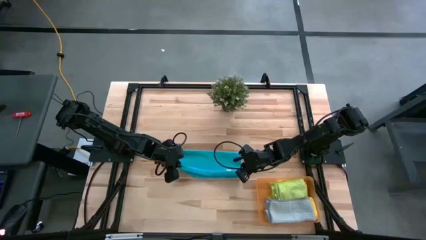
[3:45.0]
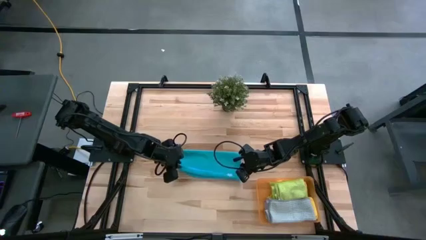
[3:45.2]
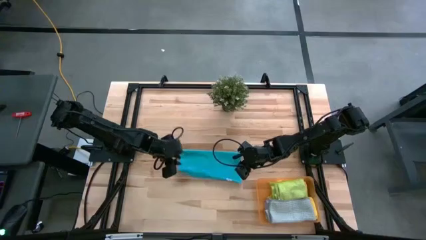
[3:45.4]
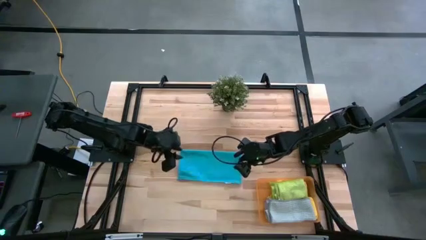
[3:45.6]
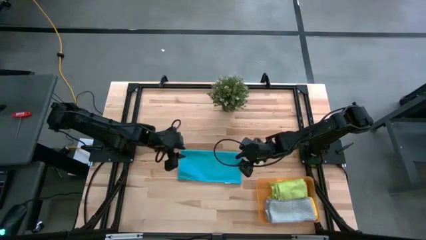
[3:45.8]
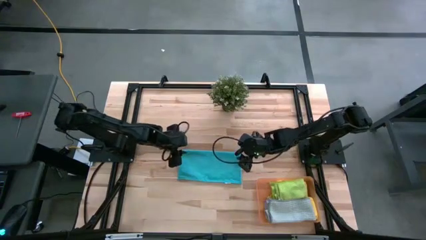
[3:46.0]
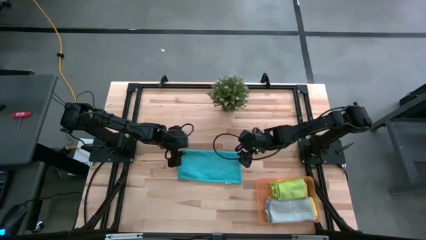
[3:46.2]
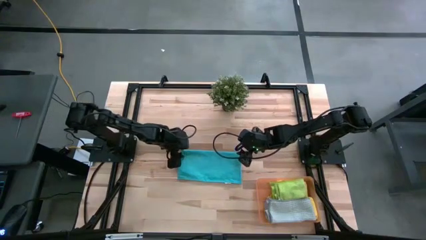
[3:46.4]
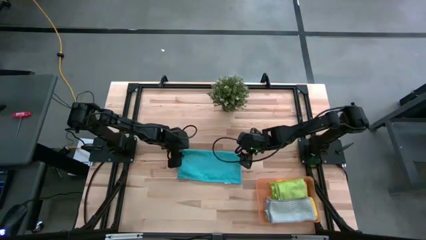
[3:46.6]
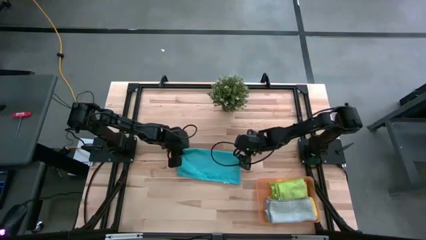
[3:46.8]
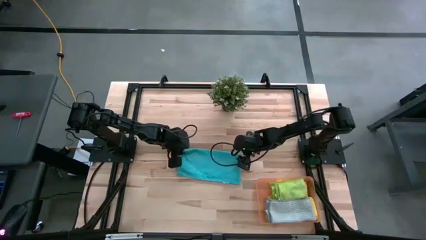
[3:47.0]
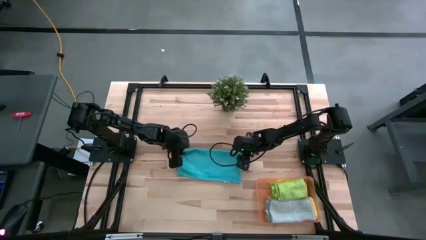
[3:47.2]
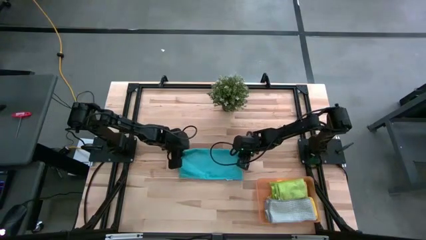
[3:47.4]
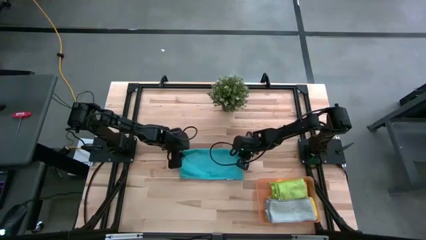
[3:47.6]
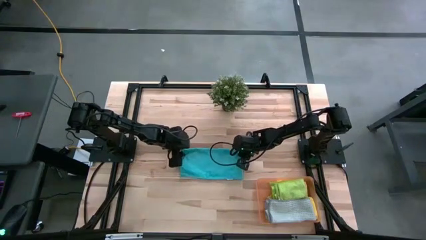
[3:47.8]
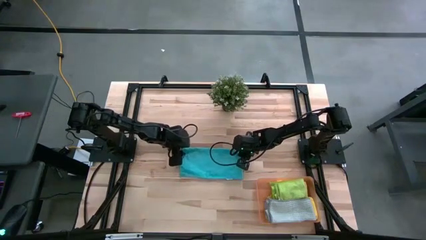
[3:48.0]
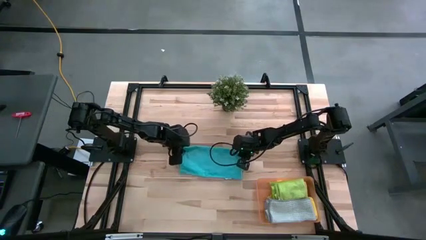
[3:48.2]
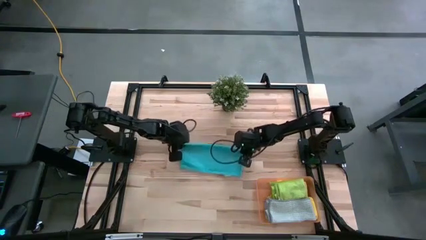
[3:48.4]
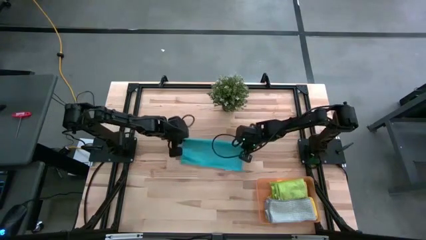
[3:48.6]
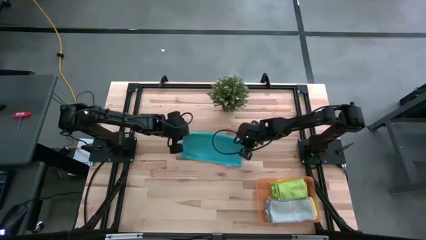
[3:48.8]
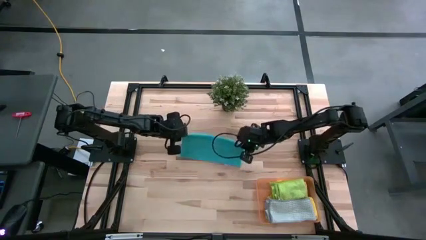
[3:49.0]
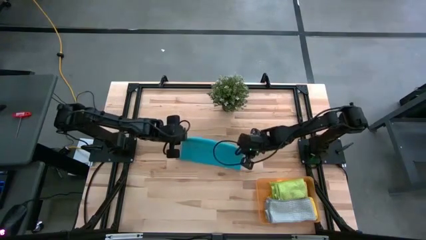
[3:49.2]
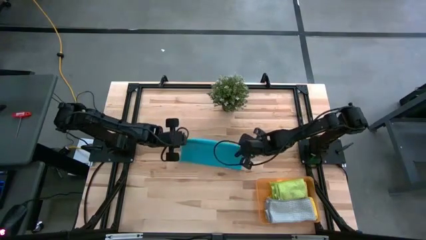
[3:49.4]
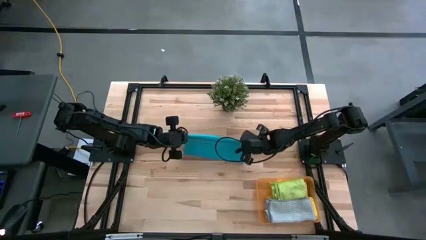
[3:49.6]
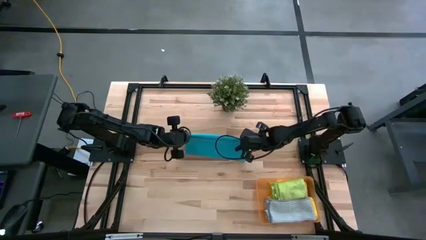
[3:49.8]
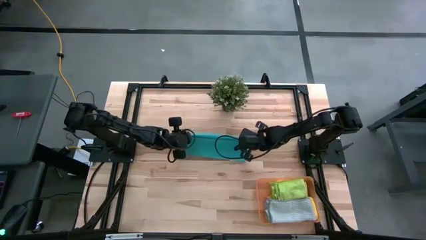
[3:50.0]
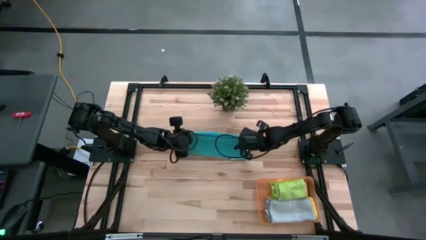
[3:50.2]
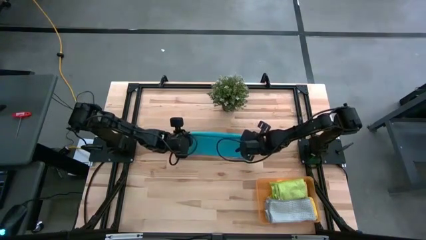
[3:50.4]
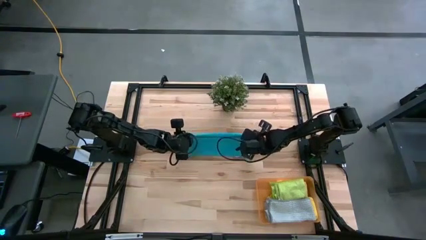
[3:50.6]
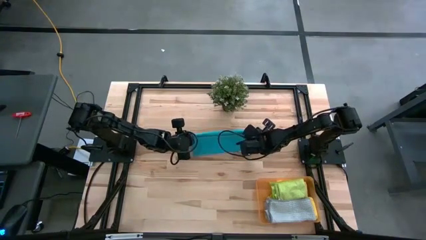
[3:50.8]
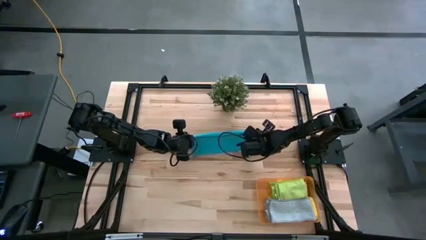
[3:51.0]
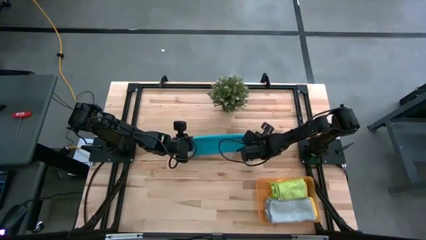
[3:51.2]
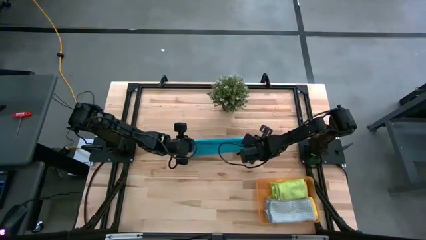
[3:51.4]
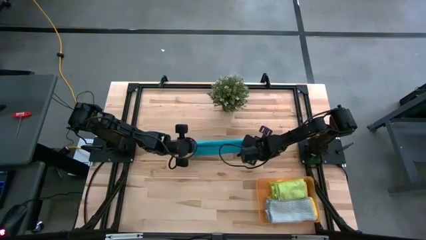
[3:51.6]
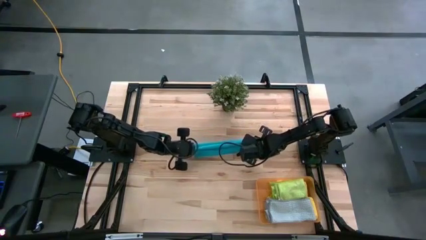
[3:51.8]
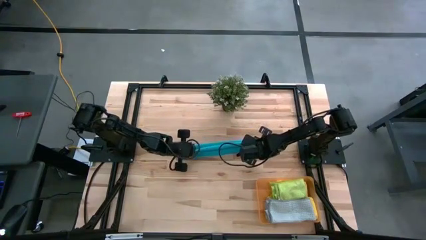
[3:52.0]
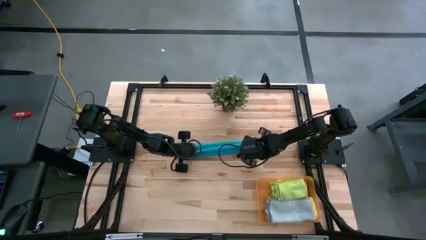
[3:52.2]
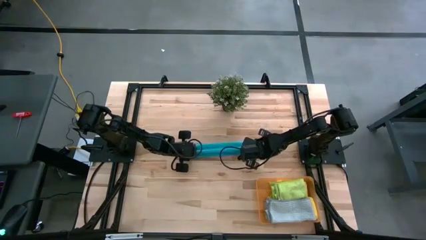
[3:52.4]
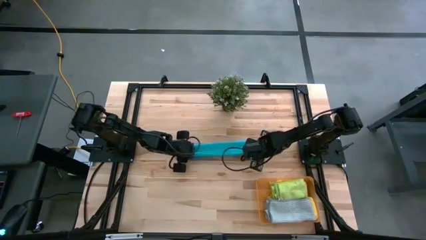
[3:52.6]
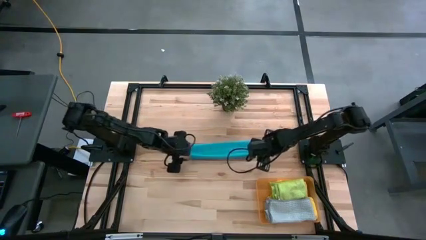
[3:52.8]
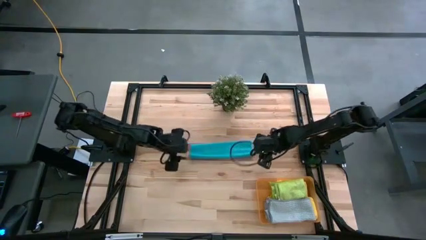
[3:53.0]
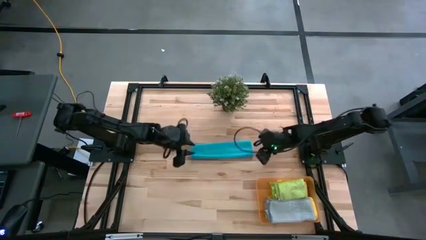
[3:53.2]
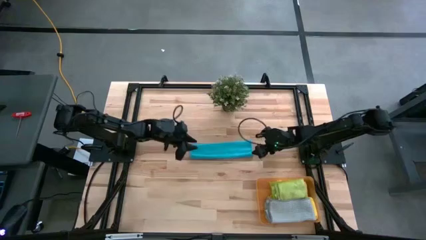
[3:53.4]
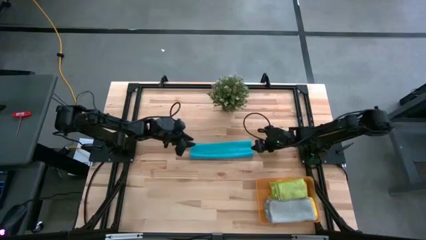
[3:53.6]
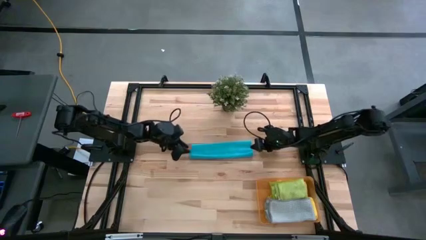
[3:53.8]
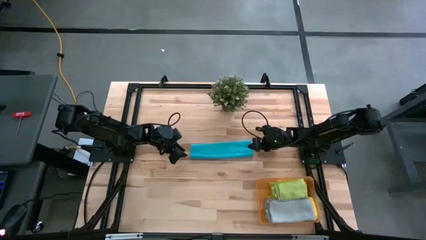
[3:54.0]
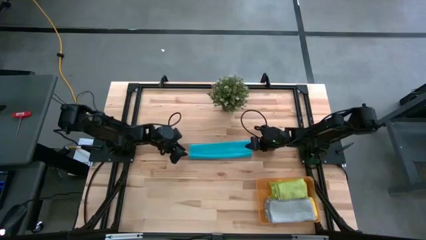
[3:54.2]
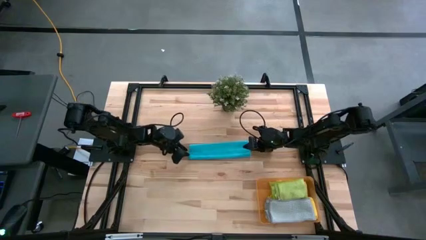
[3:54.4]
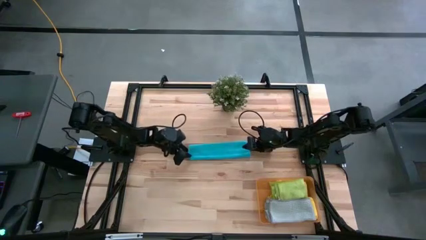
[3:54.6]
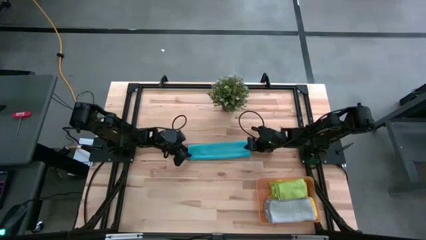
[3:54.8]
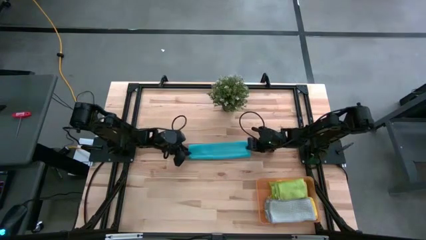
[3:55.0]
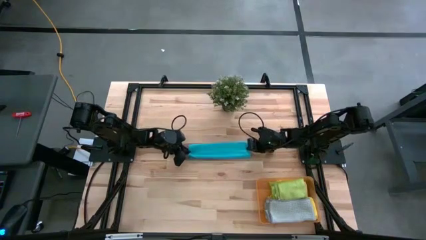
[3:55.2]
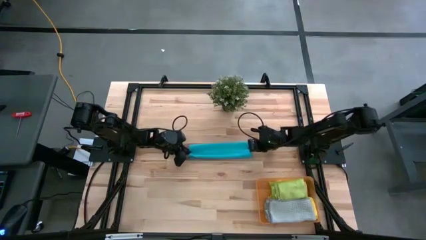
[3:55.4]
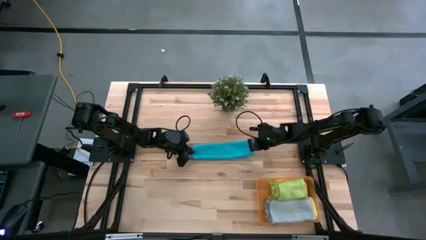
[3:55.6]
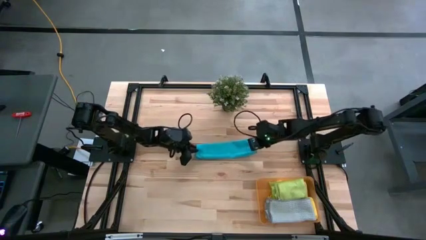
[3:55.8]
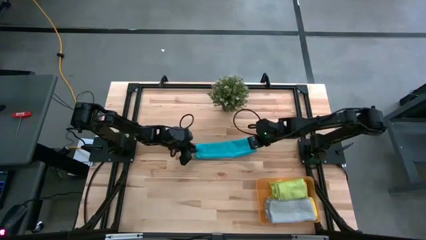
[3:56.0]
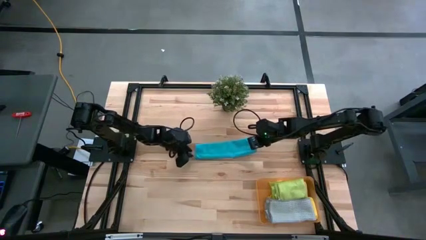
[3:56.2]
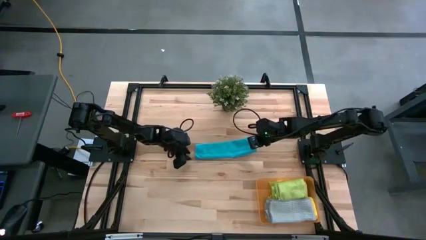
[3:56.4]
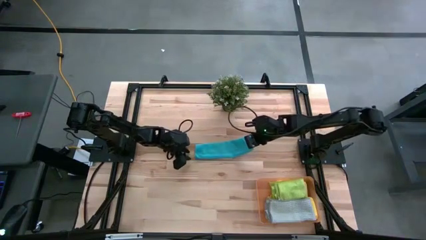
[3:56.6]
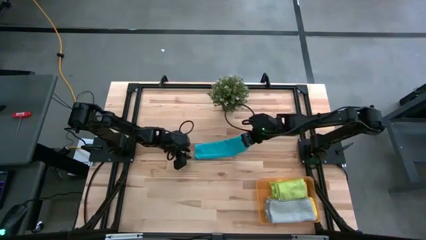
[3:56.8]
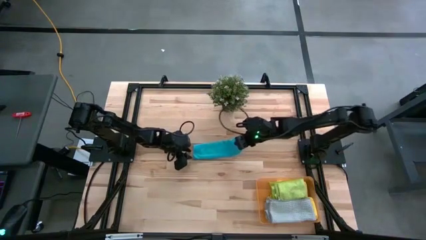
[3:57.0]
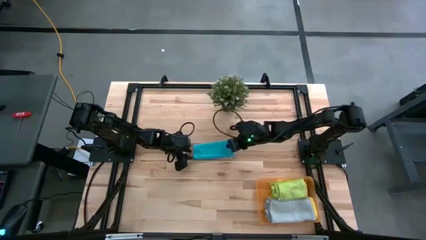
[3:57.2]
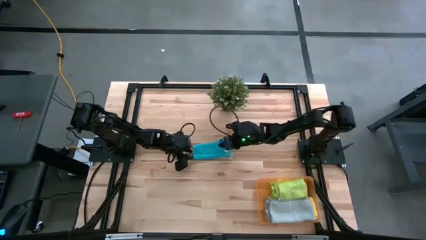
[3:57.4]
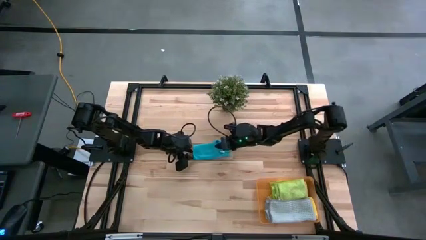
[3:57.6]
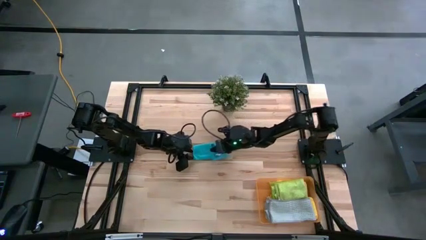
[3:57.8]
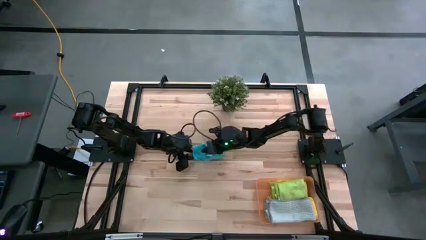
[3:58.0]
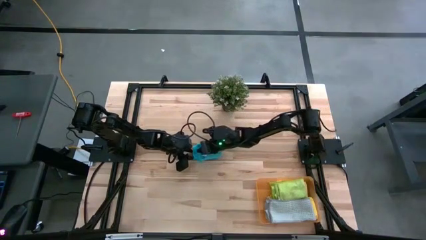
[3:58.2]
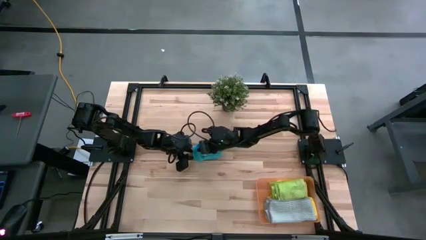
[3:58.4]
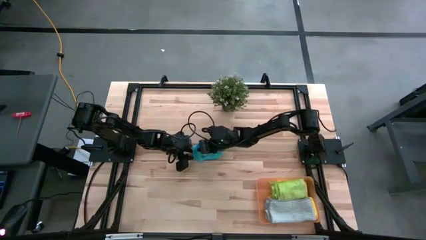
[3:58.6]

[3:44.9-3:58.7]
Task: Fold microfiber towels
Fold the blue microfiber towel

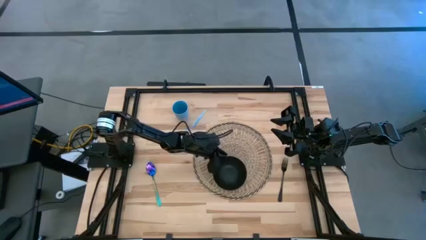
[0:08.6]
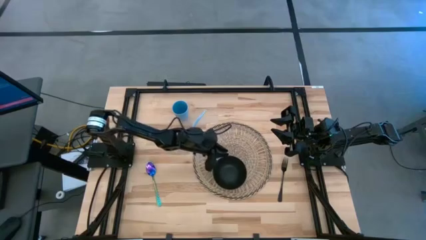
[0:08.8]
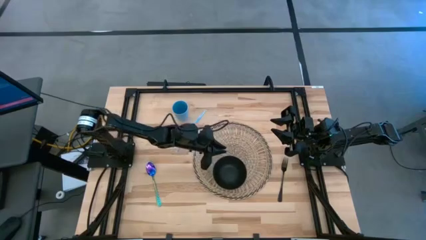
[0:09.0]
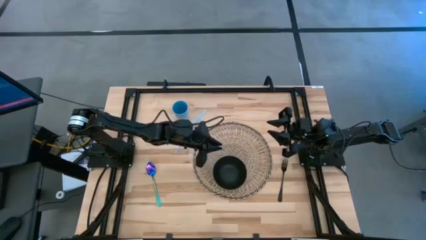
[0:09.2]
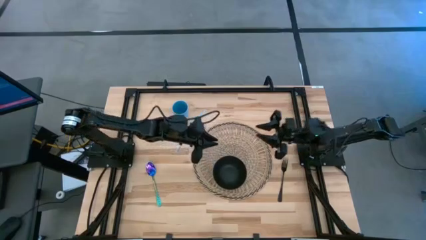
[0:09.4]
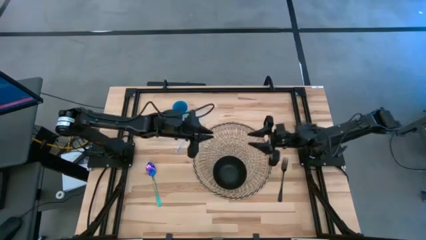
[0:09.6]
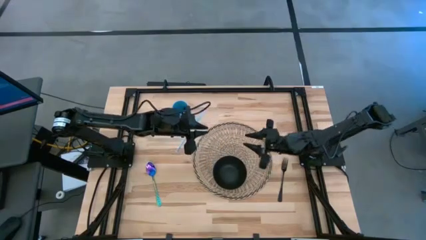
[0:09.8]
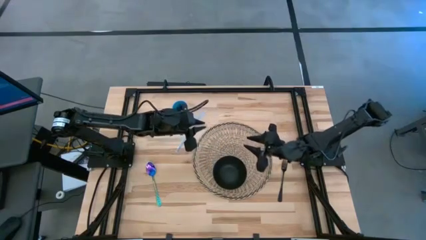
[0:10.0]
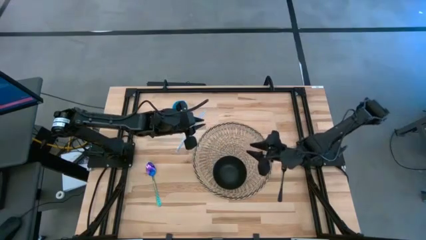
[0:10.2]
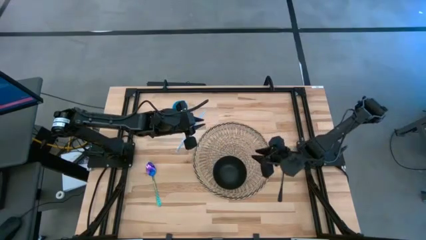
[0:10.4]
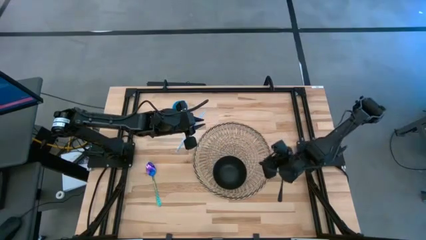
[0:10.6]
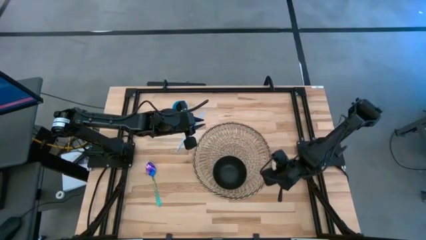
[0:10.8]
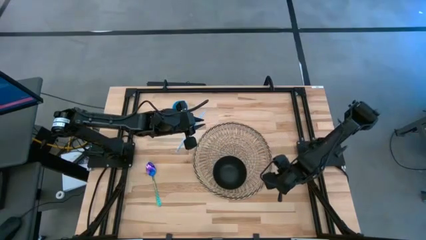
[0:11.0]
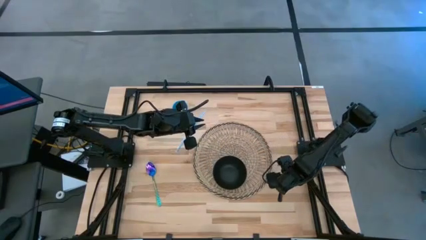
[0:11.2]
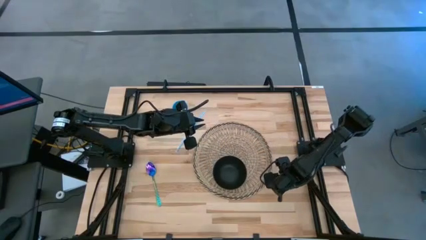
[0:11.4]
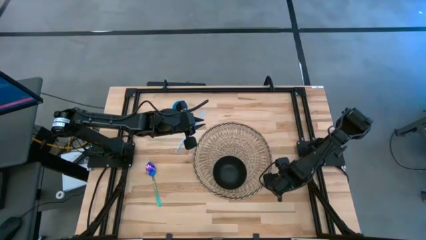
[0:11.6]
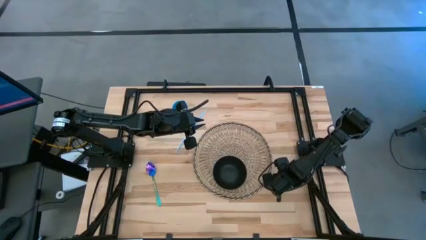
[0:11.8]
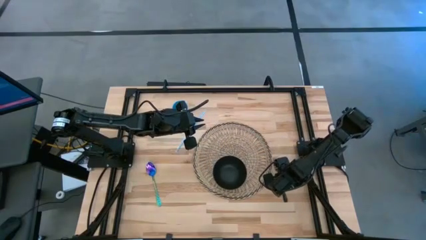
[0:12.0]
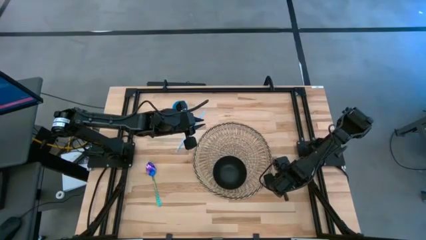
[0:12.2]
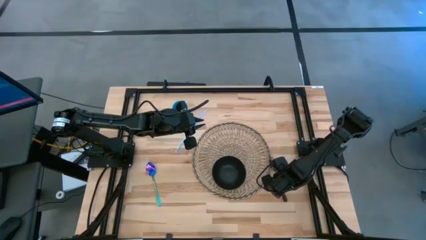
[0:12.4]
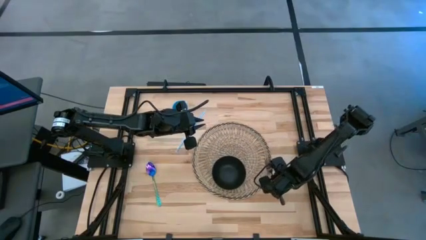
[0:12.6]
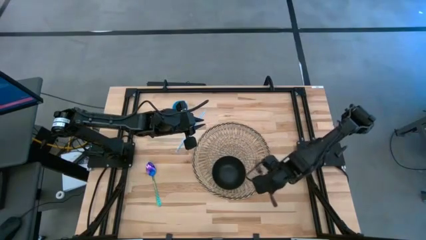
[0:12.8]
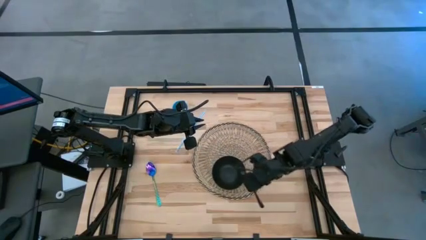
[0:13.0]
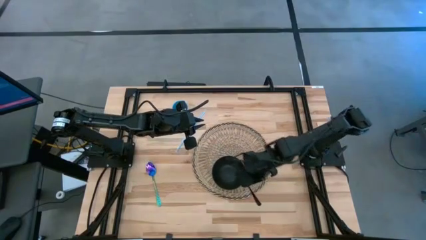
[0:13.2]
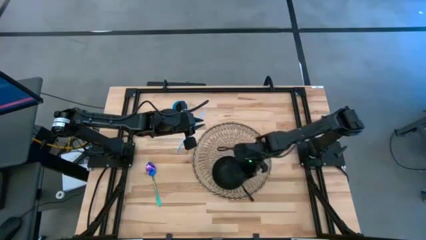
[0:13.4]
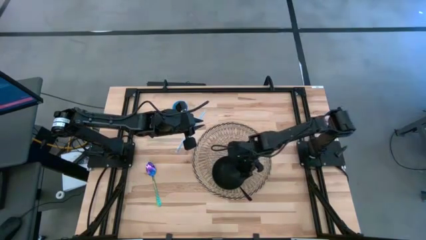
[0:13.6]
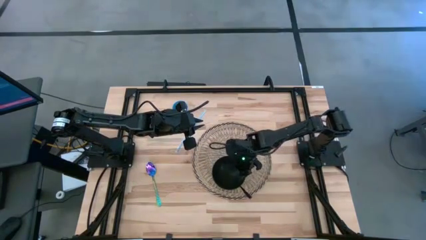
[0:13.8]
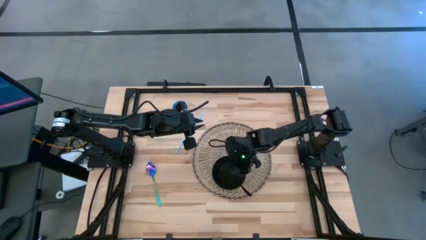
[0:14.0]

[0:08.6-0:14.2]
Task: Pick & Place Utensil
Put the black fork into the black bowl
